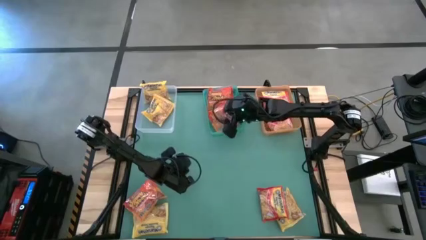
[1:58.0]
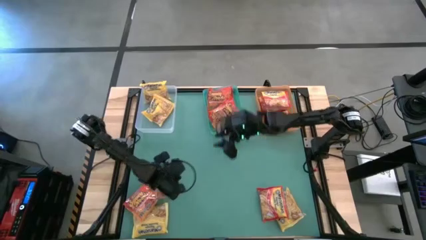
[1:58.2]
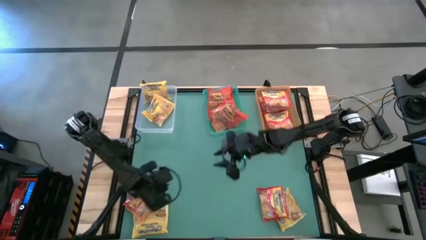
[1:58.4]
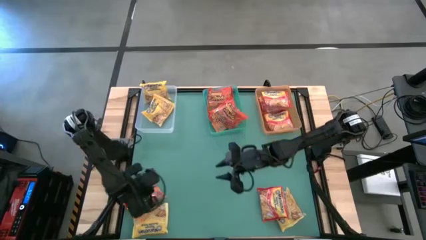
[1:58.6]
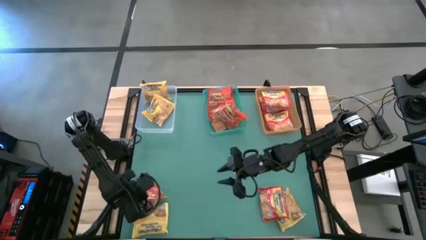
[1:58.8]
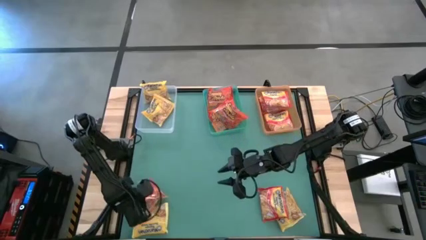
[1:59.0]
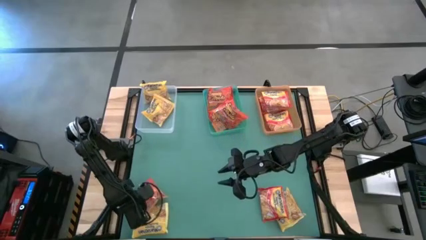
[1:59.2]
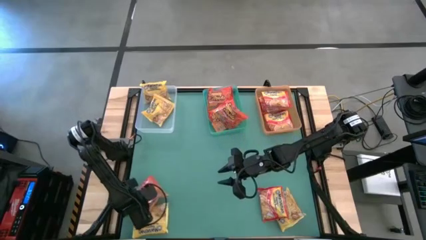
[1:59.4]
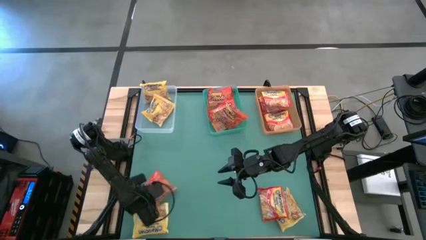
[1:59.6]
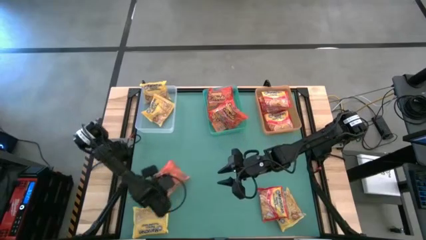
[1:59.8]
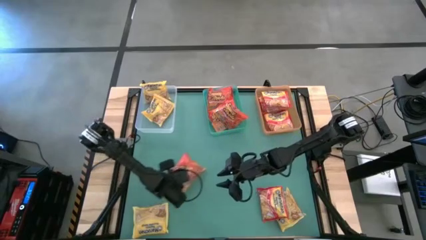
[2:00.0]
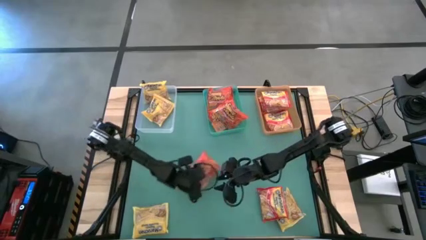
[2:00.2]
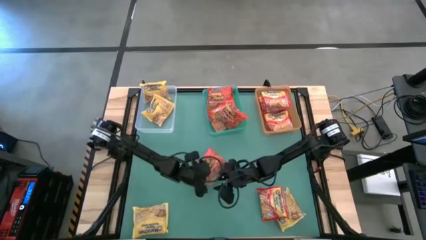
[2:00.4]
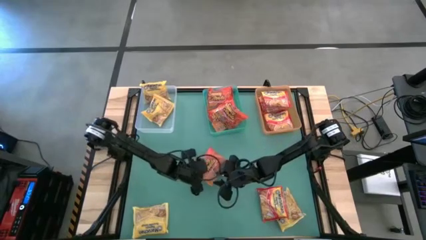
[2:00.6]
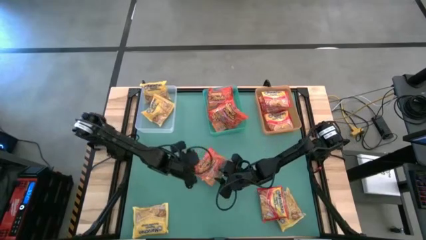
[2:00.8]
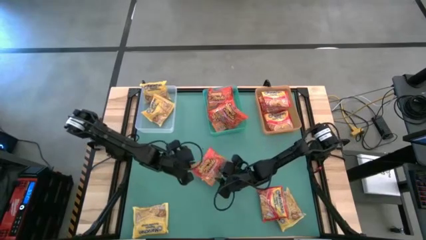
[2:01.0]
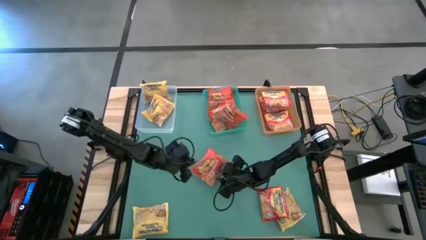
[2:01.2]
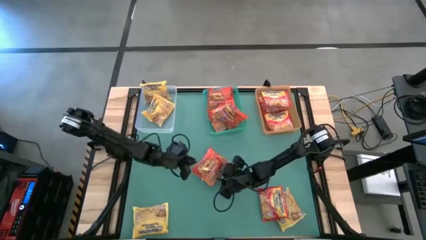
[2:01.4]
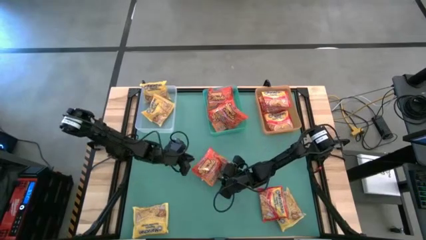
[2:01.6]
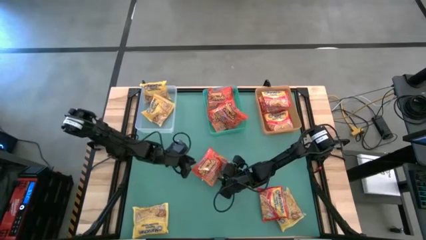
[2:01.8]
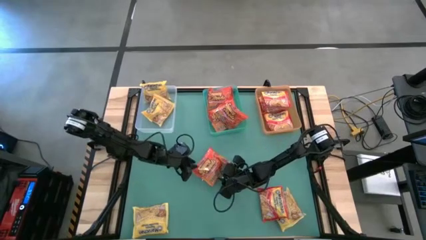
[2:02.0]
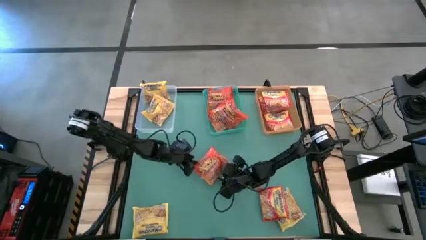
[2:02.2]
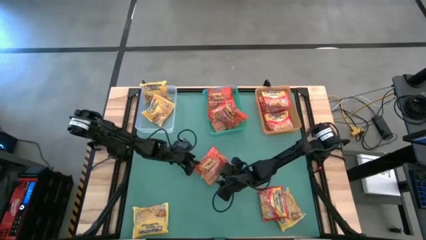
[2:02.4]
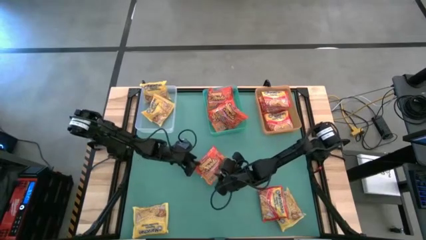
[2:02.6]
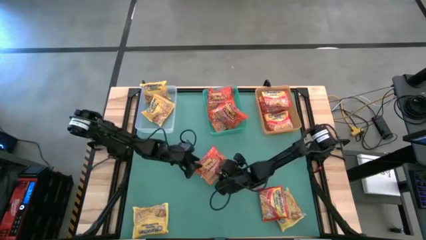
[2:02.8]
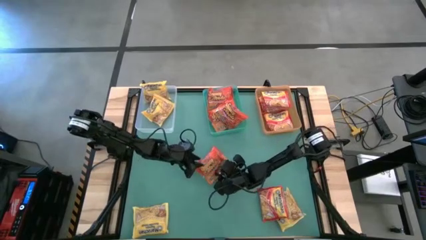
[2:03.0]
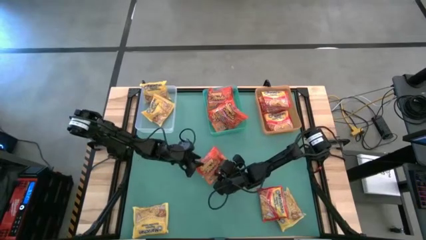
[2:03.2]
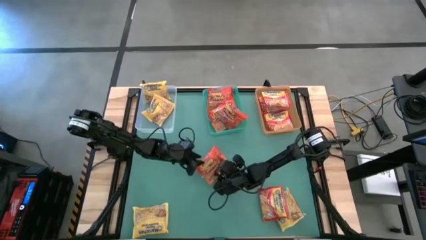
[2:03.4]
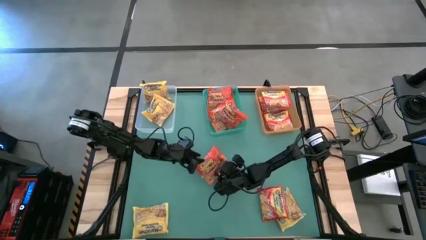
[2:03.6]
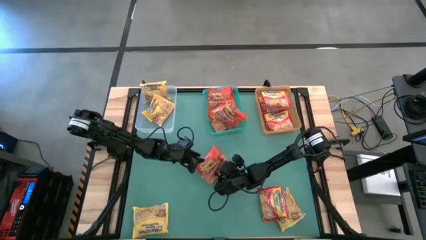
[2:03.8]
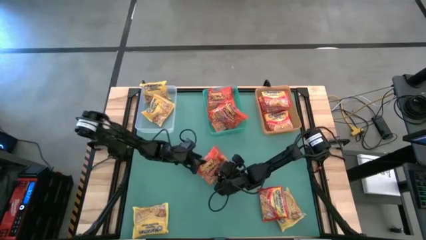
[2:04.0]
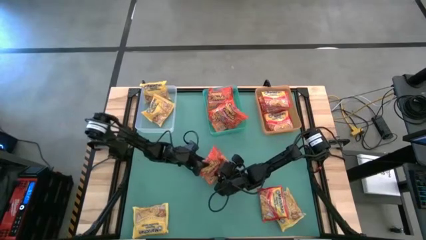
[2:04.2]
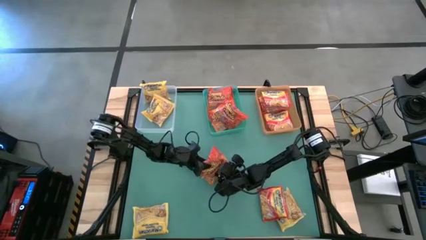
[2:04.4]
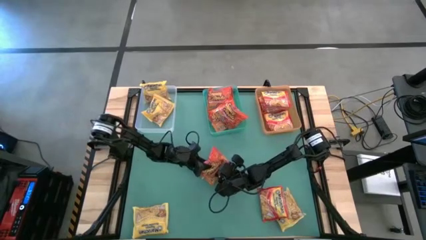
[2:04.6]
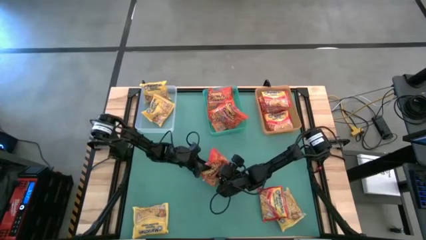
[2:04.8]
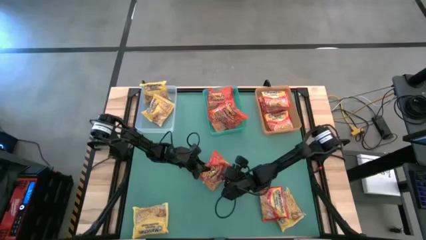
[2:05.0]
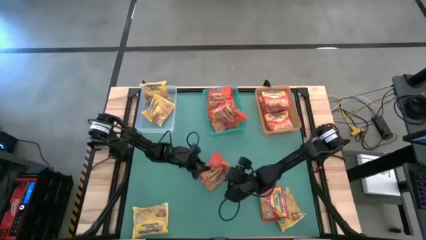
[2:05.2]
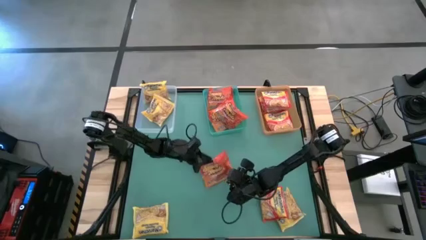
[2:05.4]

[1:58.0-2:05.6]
Task: Sort Maruchan noodles
Put the red noodle pack into the green bin

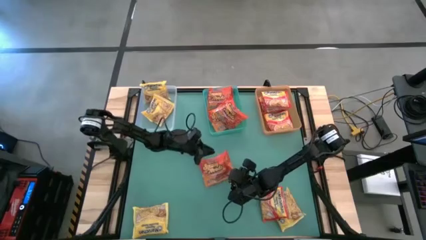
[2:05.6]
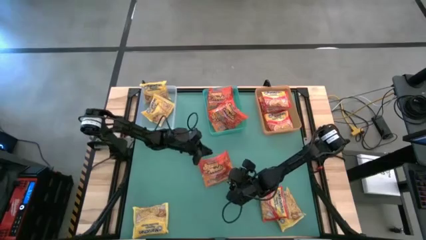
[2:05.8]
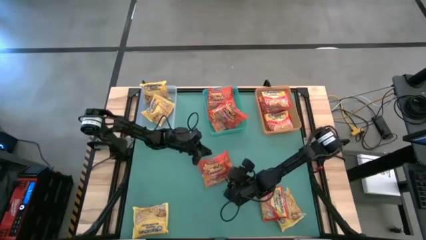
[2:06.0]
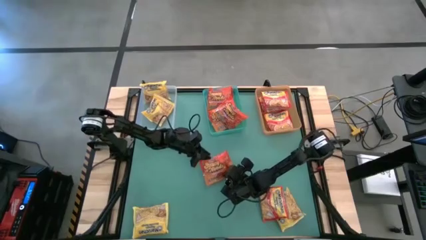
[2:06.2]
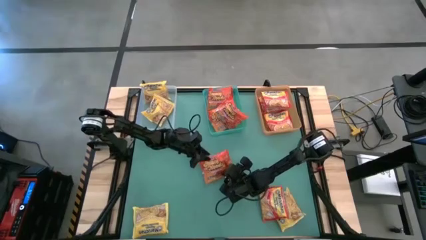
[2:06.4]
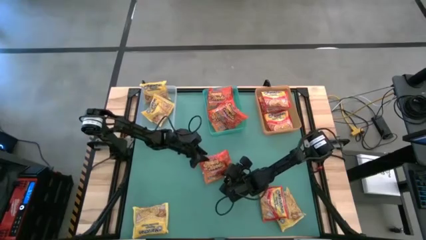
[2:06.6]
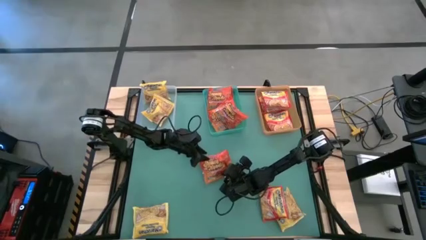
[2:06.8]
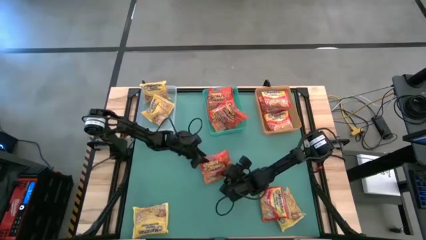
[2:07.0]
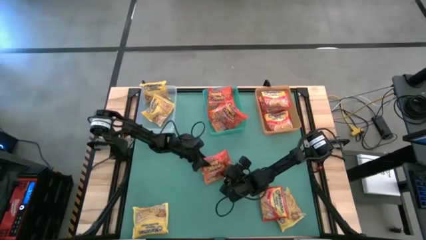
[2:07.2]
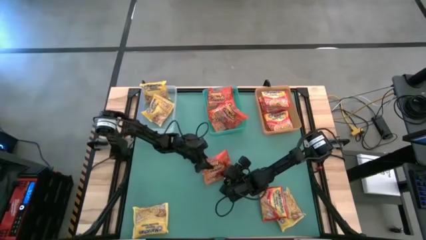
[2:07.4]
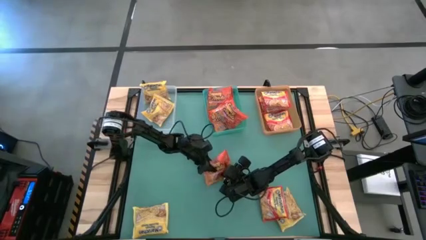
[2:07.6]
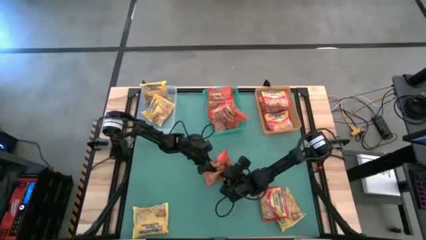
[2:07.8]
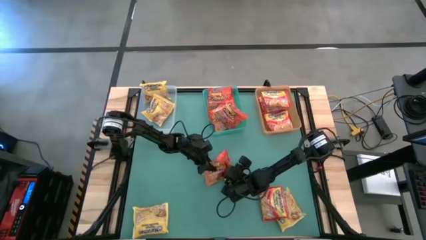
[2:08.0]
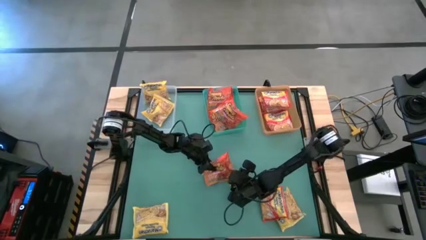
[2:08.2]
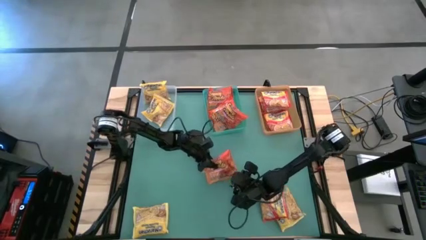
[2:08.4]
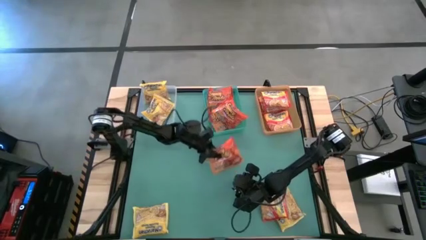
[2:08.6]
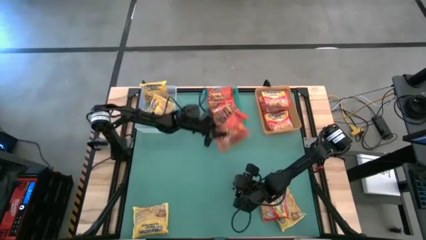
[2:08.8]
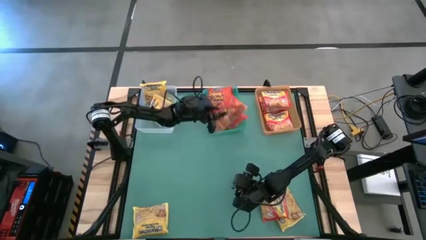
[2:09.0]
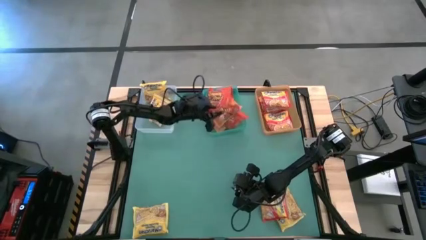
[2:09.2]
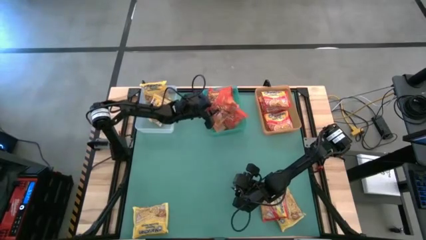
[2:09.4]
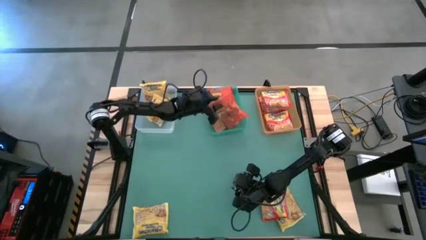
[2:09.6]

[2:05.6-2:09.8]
Put the red noodle pack into the green bin

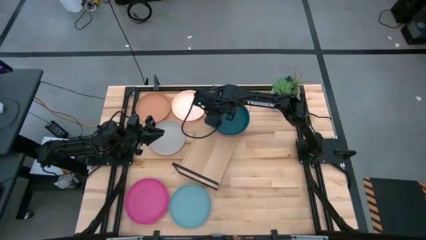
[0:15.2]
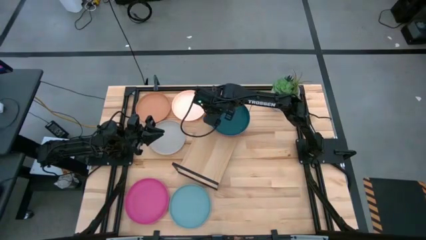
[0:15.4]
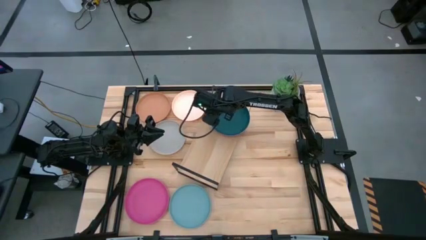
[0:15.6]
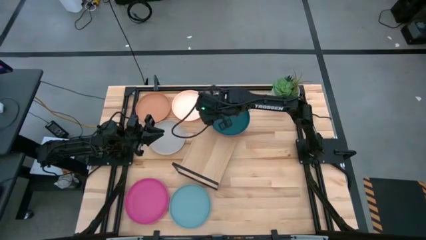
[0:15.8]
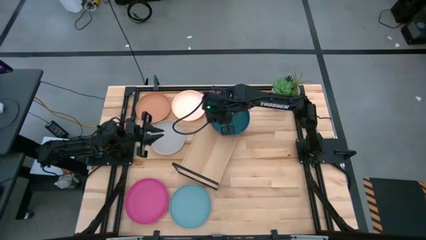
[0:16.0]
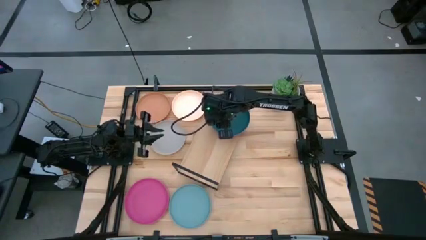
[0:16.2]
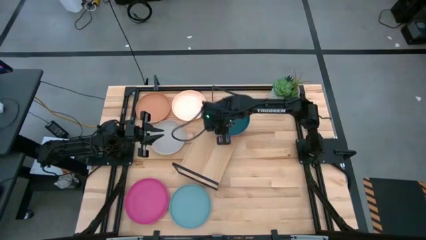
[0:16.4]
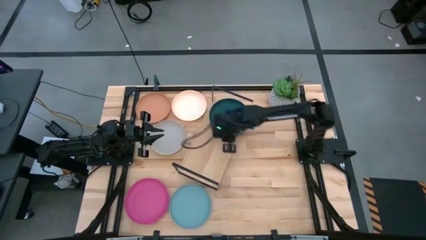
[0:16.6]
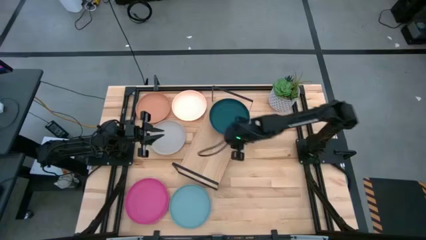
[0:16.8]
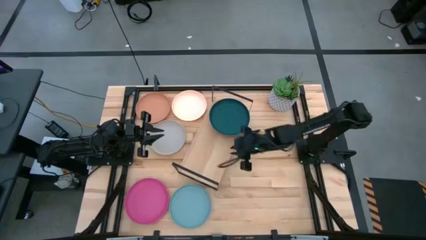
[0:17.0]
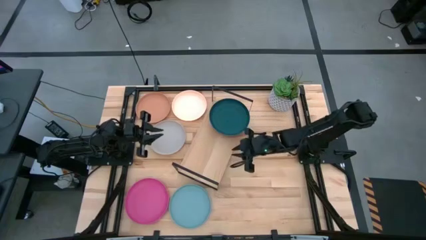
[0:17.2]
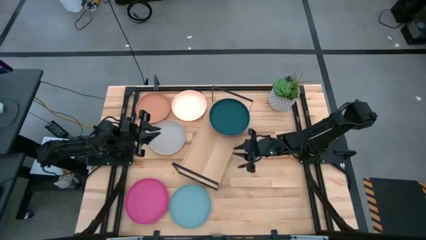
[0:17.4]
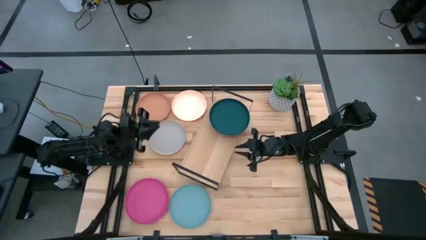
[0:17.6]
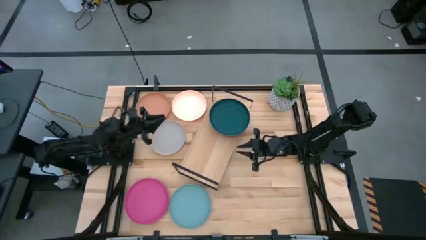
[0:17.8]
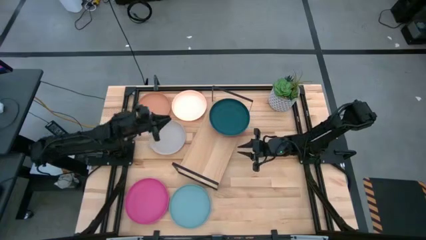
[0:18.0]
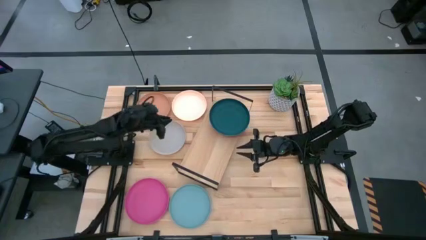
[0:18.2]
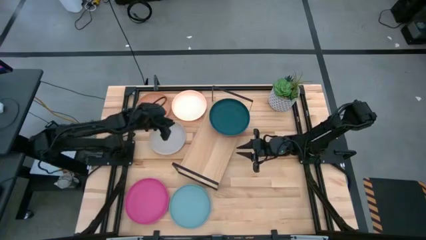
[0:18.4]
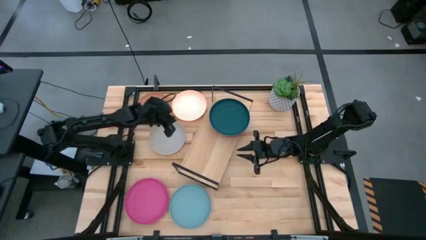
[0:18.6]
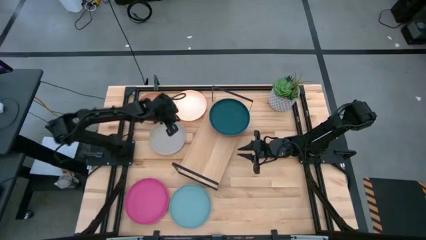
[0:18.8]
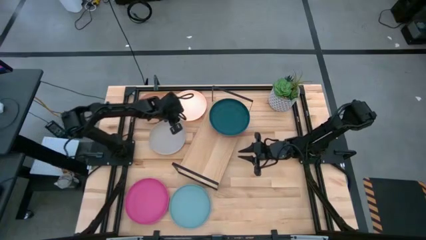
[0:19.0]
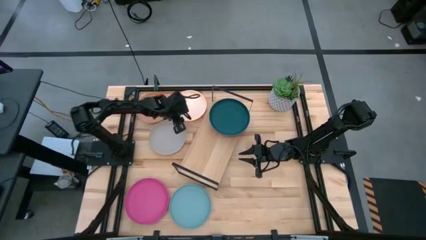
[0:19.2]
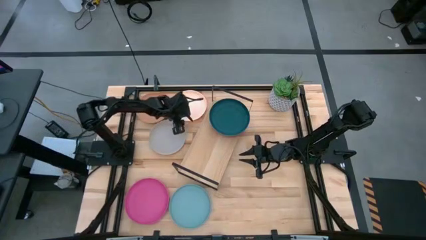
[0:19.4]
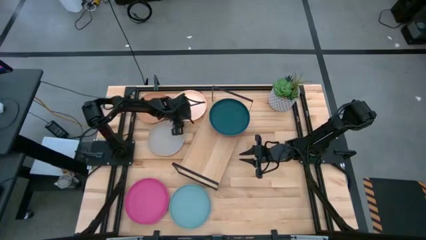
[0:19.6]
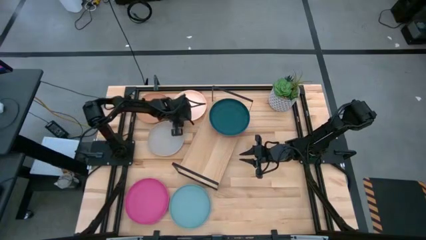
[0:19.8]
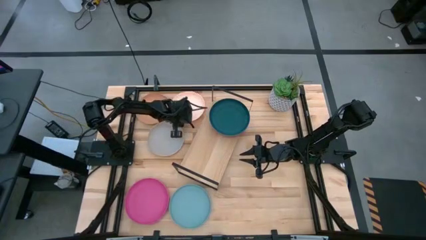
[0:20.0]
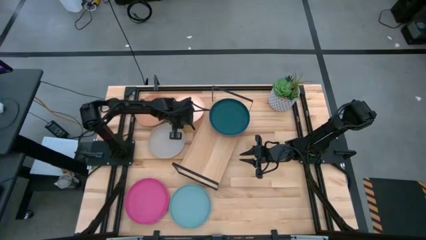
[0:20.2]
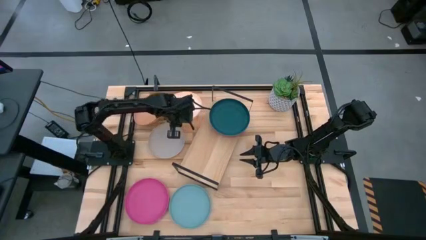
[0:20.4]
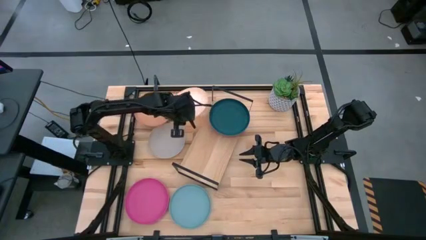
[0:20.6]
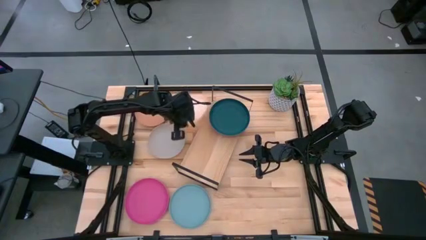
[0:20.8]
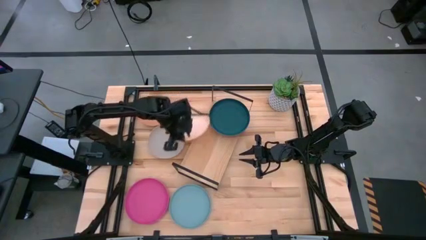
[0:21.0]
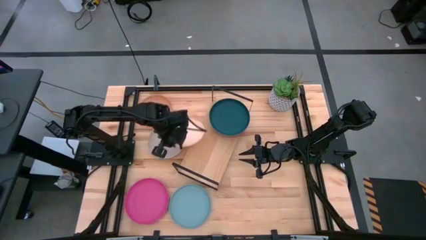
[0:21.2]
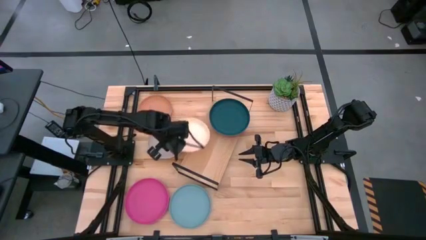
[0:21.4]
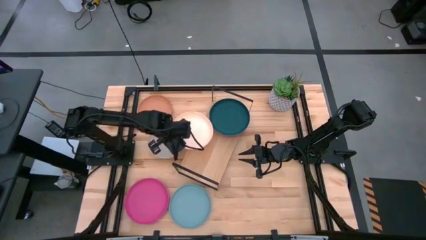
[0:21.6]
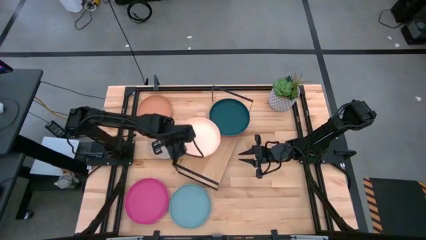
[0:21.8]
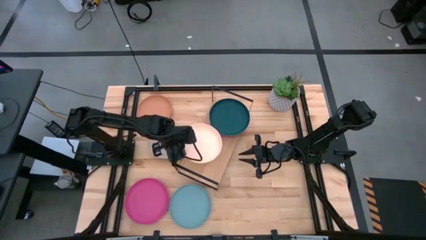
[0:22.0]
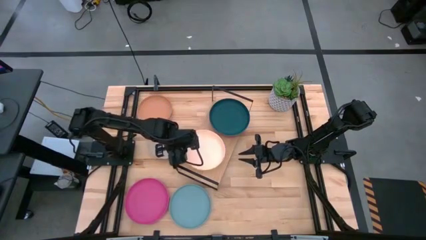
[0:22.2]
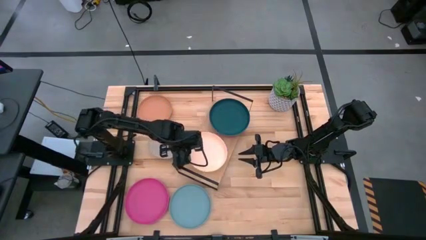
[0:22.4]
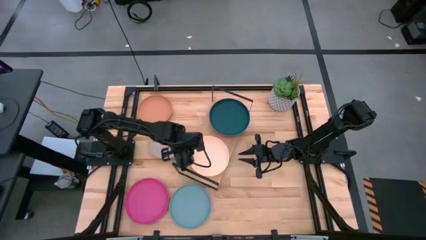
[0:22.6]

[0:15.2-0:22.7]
Task: Place and stack plates onto a shelf
Put the white plate on the shelf
